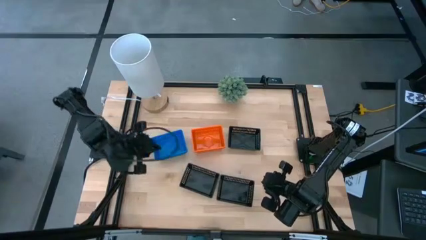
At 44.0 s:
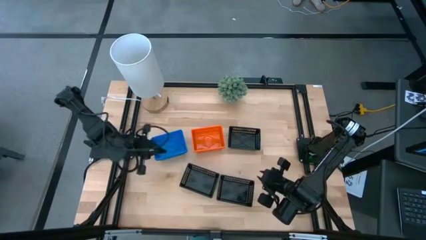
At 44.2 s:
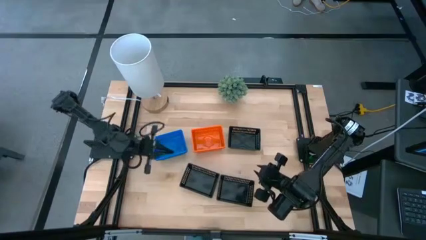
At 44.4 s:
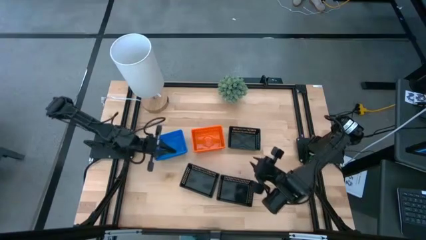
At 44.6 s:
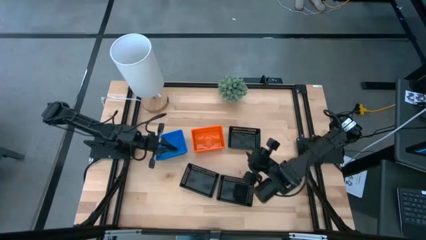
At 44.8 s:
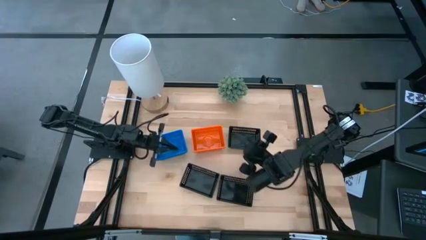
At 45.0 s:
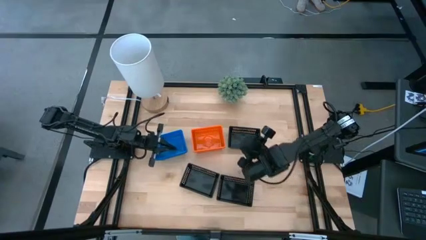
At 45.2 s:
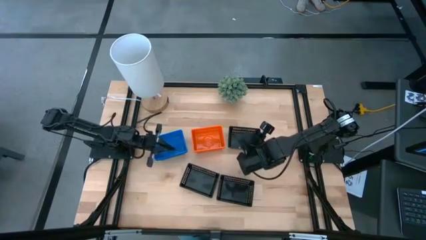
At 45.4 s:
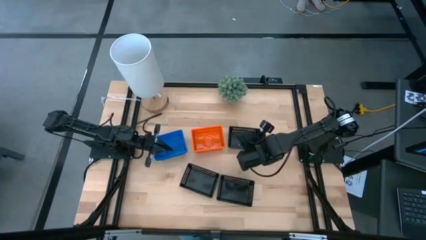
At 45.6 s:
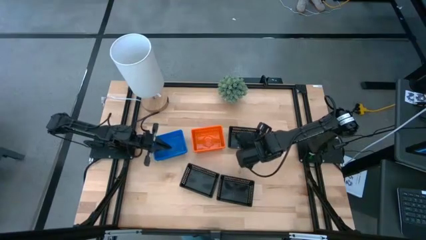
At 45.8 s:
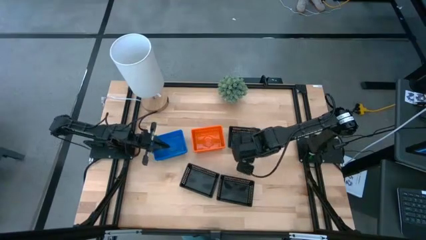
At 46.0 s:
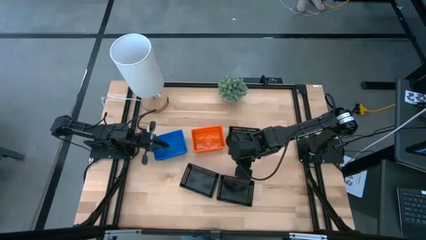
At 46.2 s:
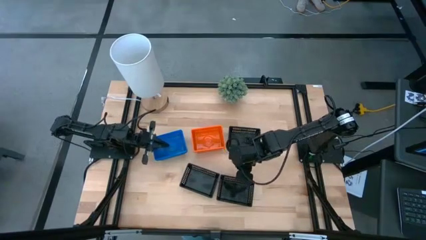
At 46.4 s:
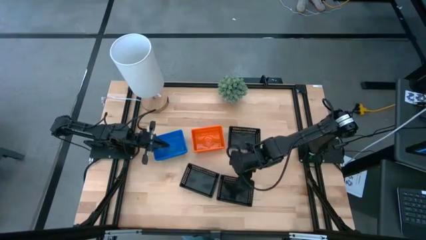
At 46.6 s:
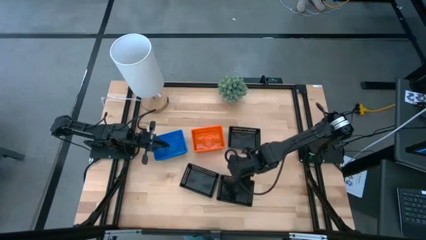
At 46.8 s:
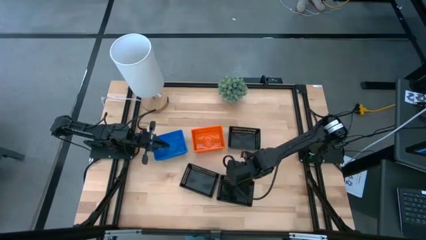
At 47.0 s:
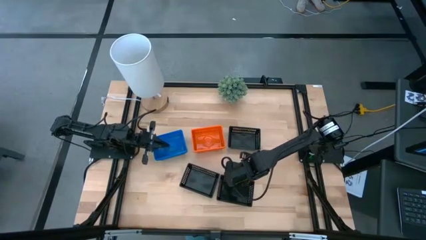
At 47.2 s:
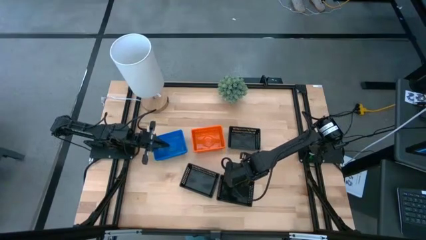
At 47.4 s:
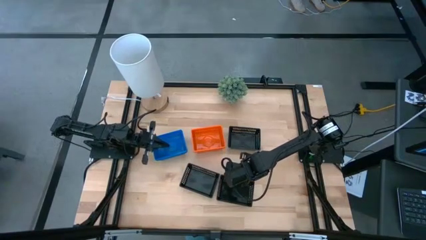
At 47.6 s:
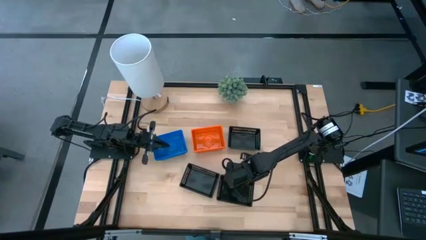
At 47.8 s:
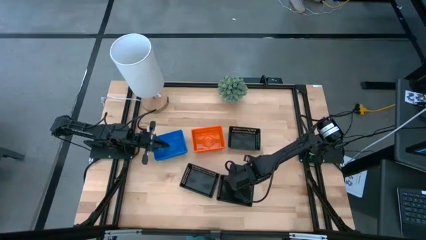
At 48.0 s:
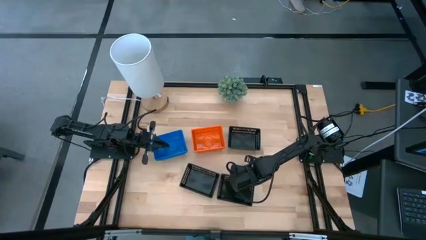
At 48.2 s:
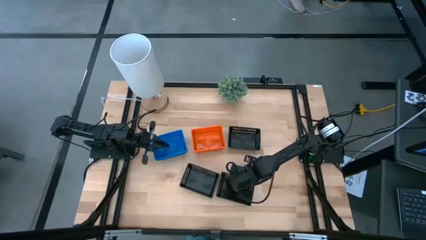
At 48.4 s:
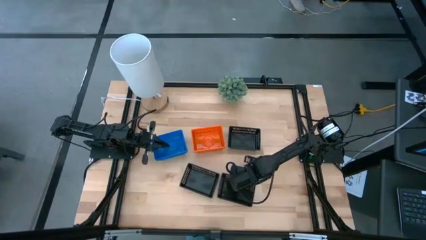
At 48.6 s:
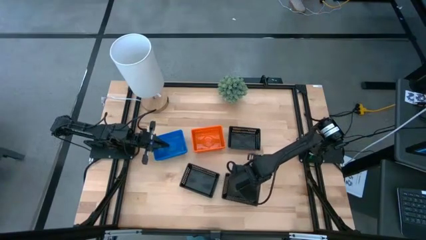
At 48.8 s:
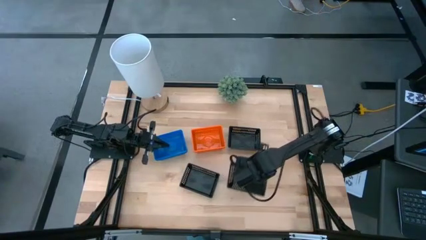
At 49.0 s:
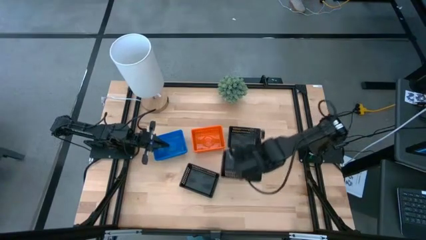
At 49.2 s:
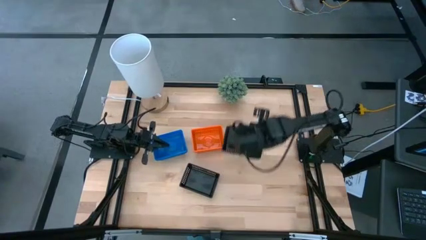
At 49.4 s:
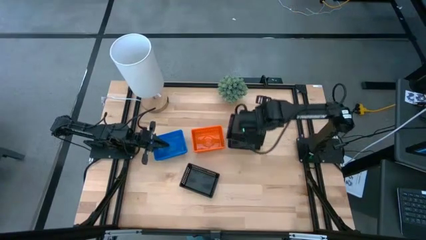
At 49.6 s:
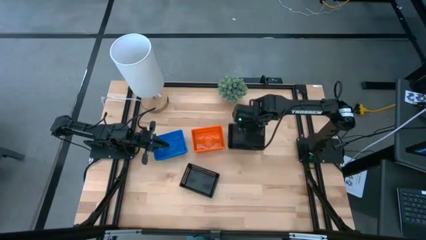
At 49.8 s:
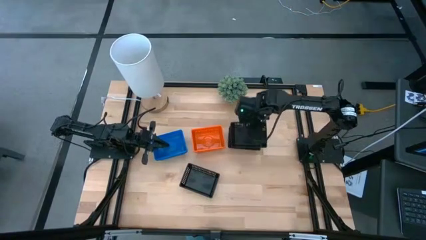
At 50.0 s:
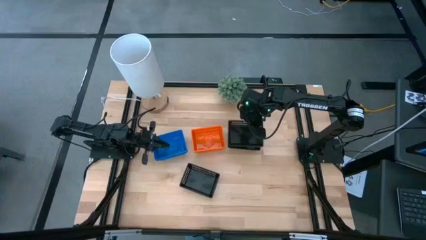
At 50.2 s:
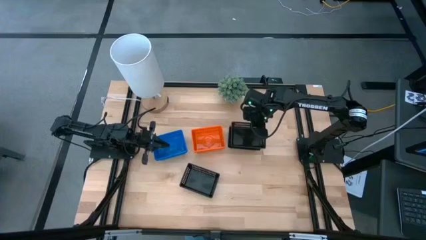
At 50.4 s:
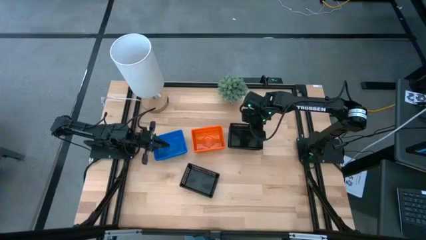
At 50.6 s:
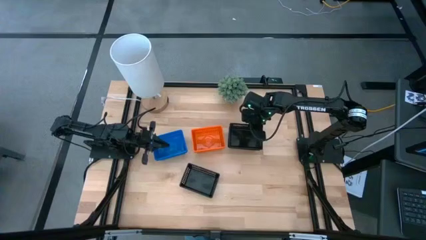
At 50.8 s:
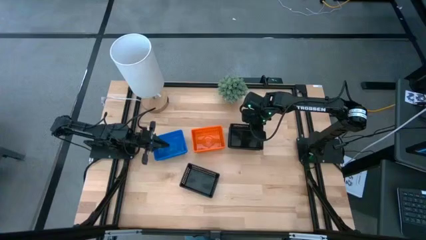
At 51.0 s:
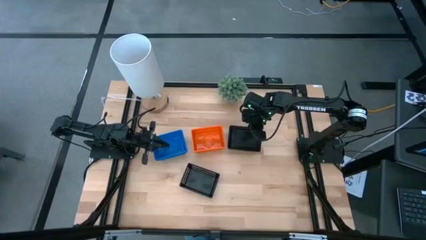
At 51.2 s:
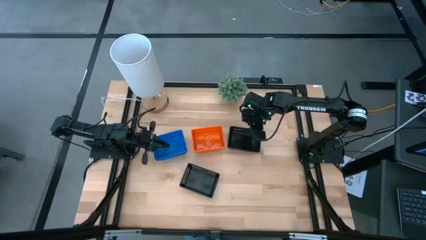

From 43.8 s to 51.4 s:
Stack the bottom right black bin on the top of the top black bins

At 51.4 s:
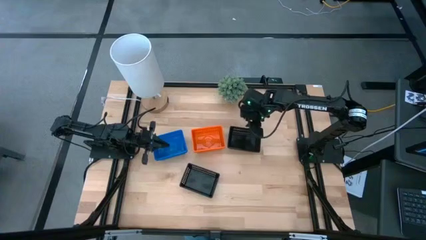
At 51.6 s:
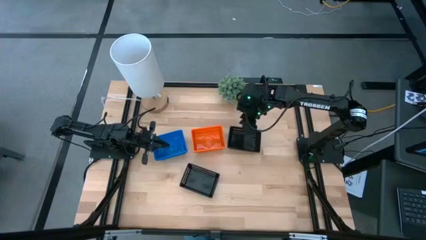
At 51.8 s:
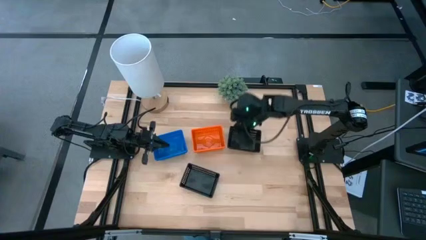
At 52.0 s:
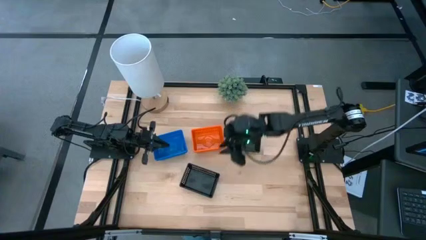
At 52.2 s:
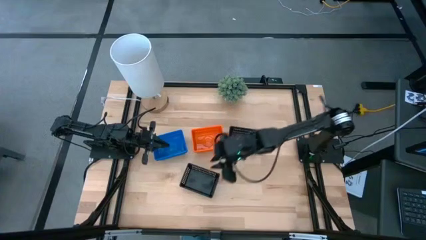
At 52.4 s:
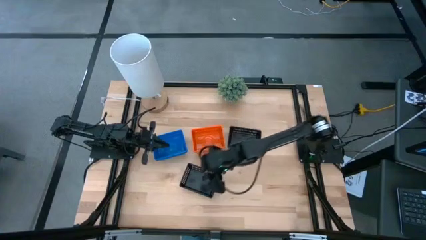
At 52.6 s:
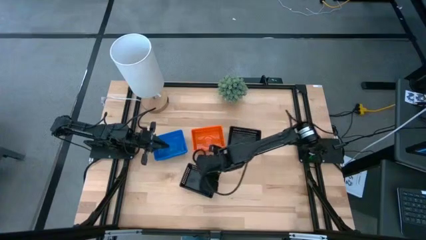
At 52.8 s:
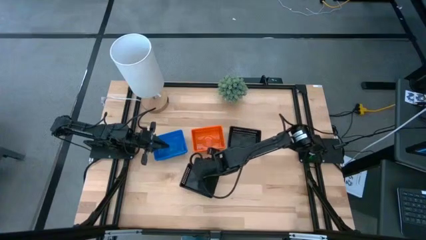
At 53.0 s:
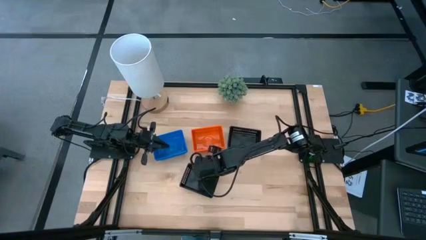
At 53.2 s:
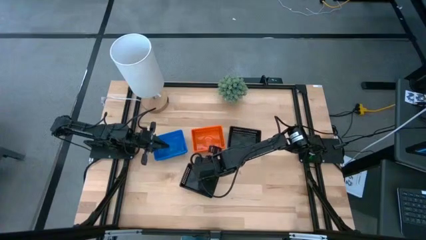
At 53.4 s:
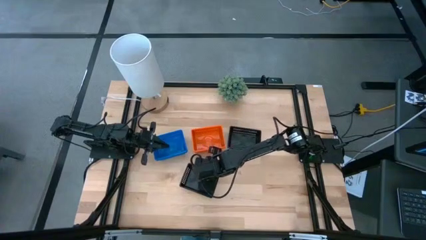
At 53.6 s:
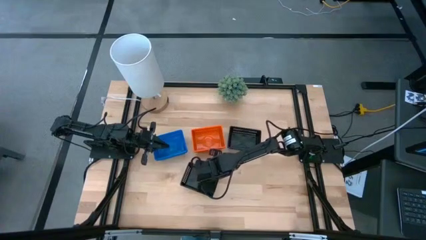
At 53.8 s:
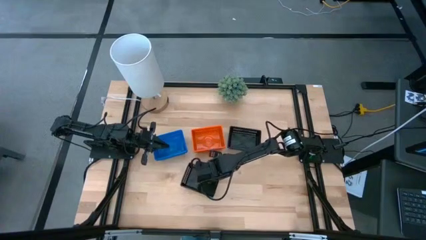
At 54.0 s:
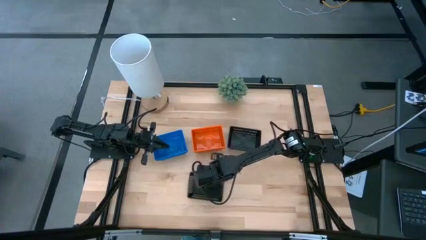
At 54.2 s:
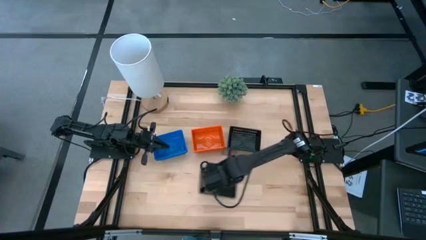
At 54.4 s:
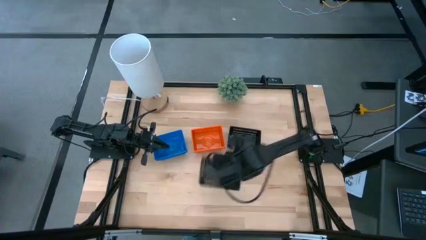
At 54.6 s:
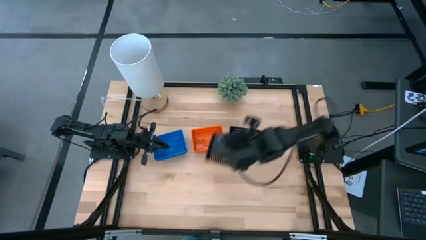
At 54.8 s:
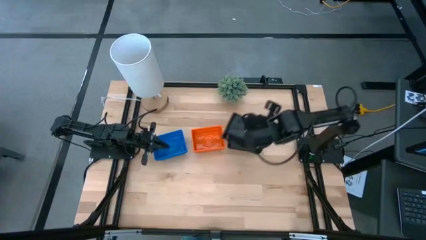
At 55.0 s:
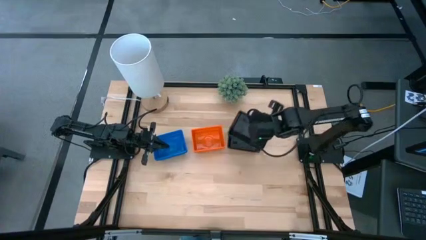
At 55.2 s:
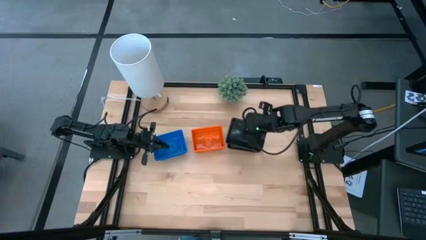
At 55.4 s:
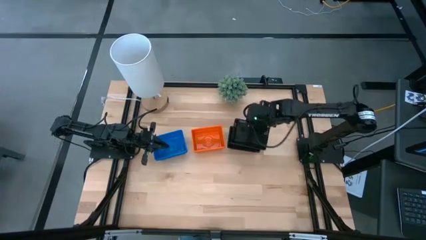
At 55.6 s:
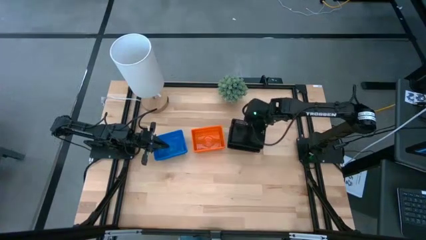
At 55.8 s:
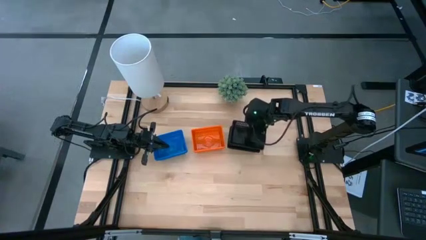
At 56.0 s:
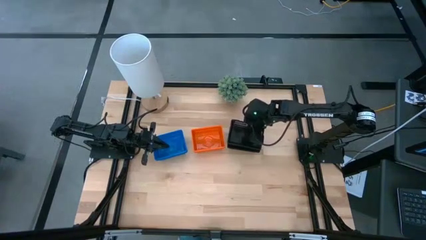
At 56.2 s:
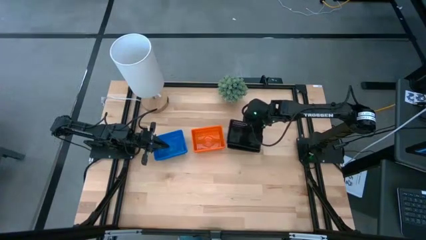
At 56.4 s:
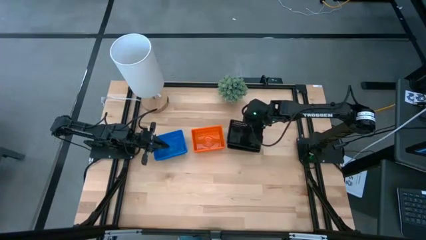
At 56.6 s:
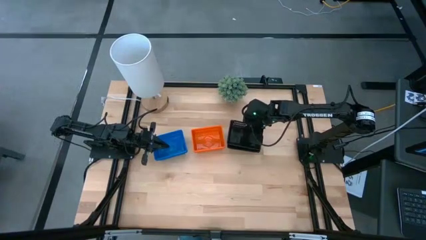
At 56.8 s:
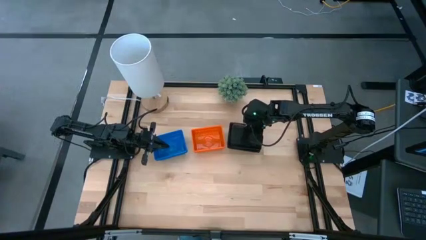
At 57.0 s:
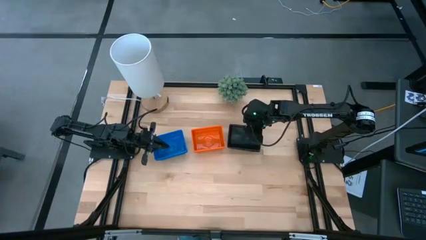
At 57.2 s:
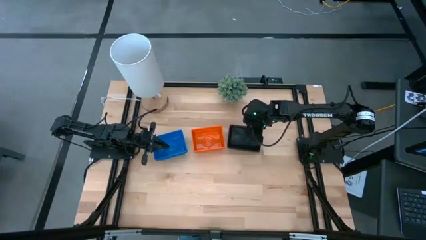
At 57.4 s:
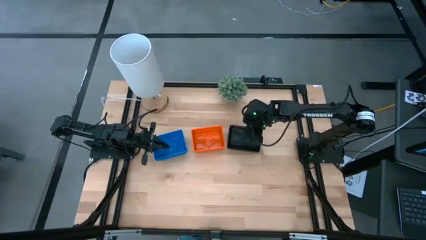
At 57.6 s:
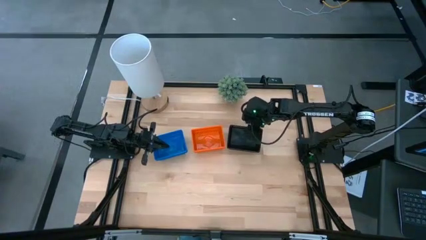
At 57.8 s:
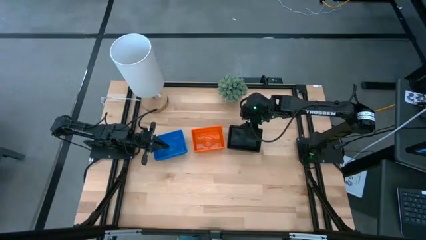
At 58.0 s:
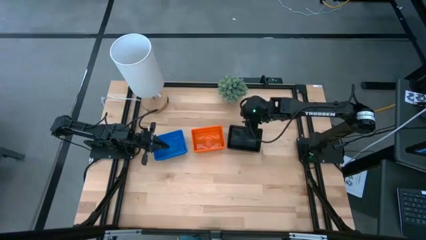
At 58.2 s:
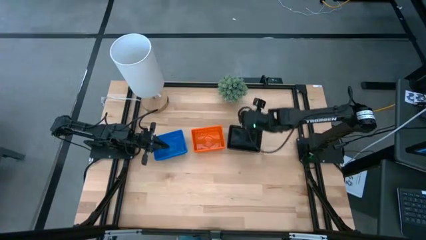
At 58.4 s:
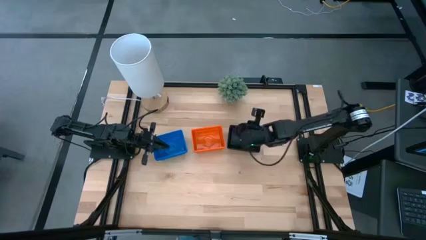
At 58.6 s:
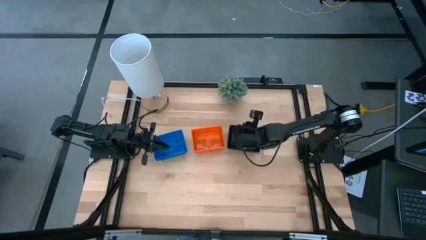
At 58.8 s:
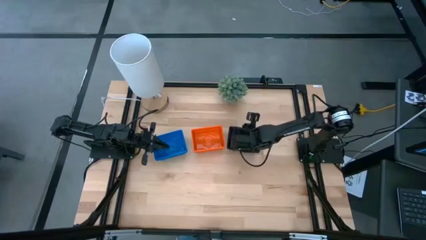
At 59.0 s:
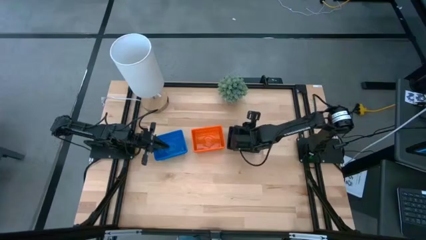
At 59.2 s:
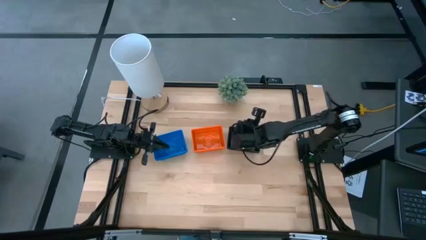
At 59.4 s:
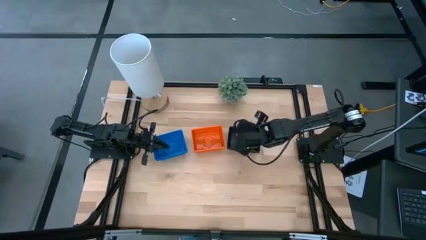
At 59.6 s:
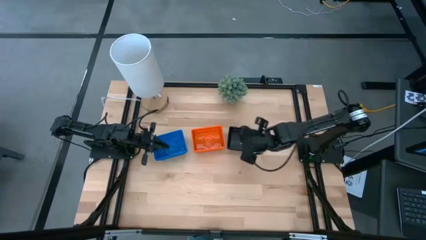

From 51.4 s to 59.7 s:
Stack the bottom black bin on the top of the top black bins
